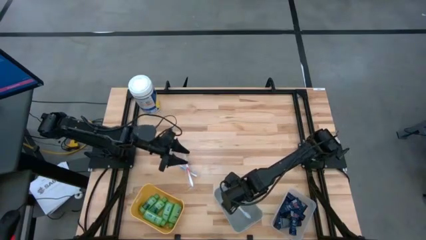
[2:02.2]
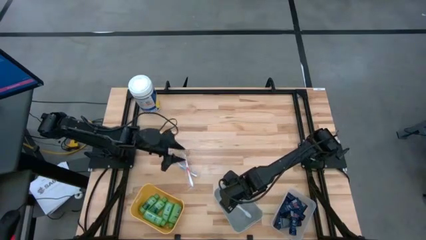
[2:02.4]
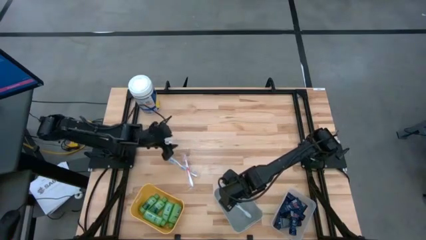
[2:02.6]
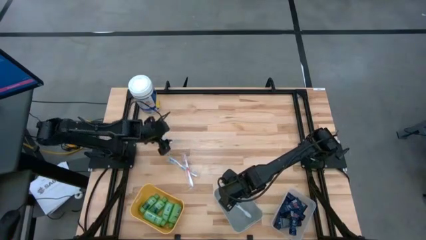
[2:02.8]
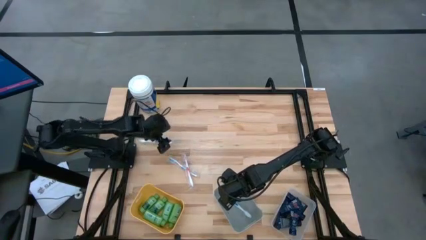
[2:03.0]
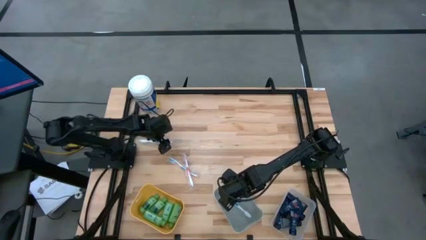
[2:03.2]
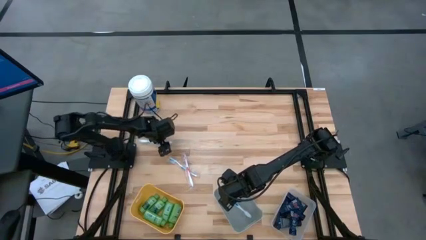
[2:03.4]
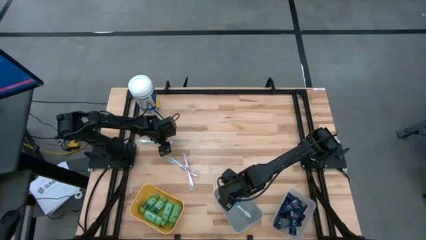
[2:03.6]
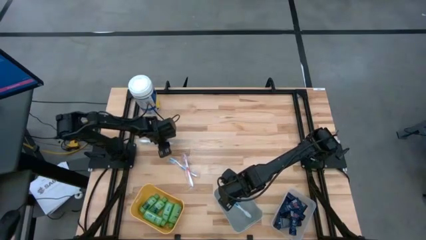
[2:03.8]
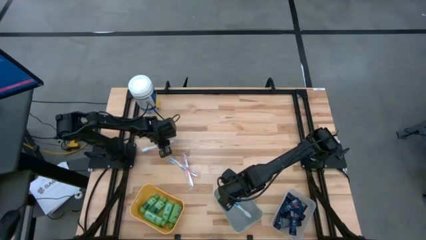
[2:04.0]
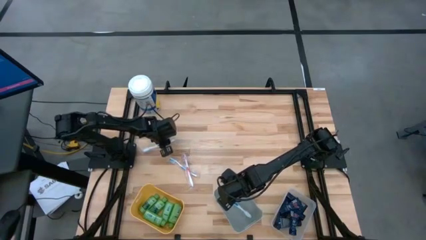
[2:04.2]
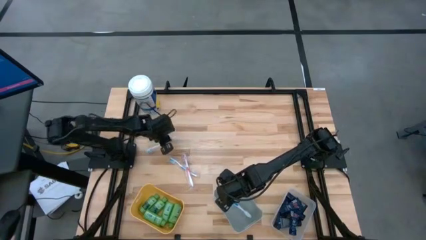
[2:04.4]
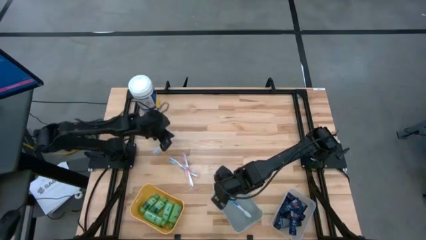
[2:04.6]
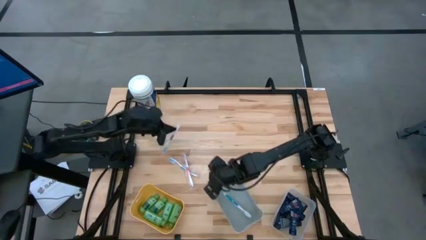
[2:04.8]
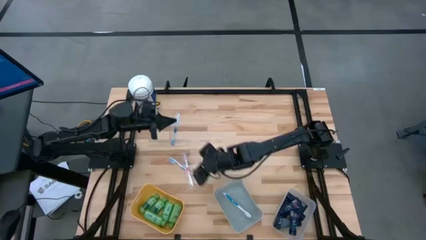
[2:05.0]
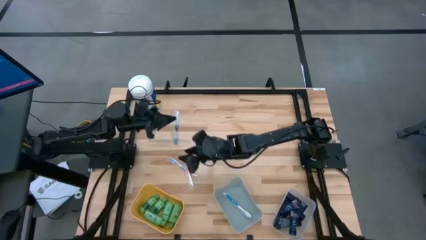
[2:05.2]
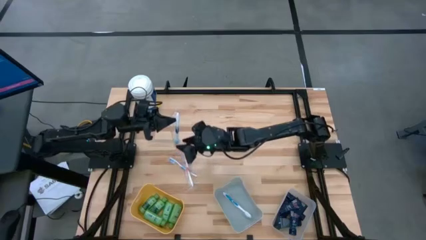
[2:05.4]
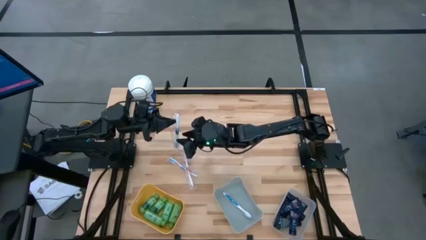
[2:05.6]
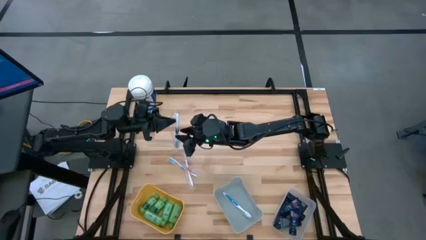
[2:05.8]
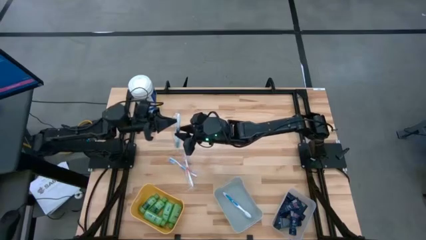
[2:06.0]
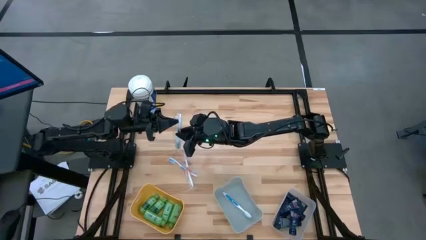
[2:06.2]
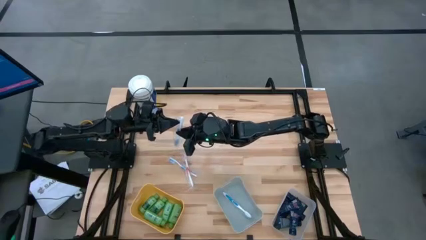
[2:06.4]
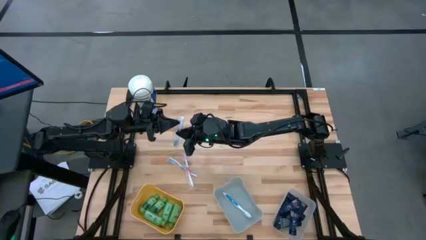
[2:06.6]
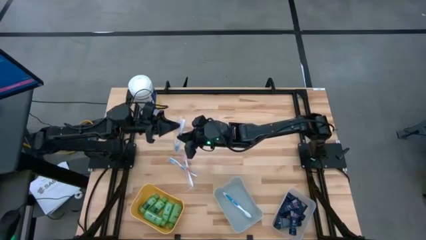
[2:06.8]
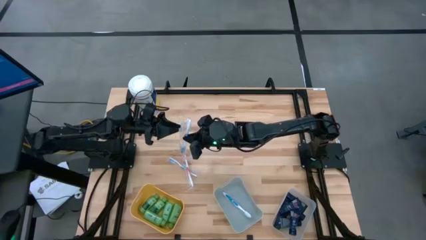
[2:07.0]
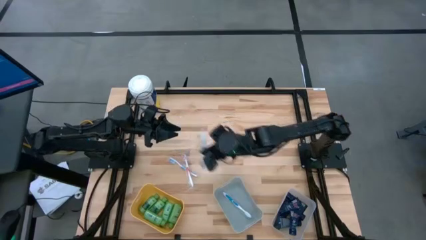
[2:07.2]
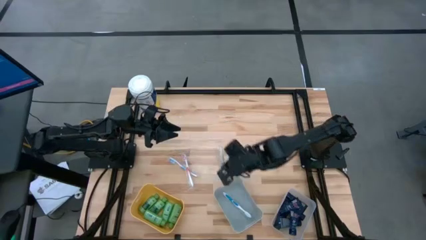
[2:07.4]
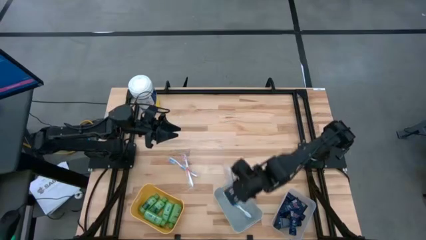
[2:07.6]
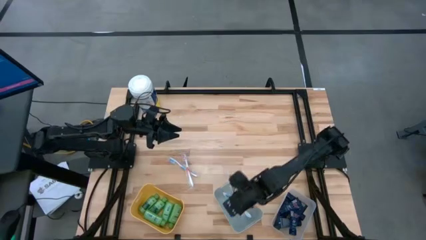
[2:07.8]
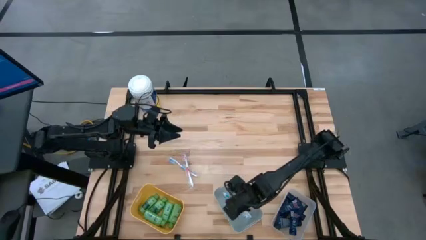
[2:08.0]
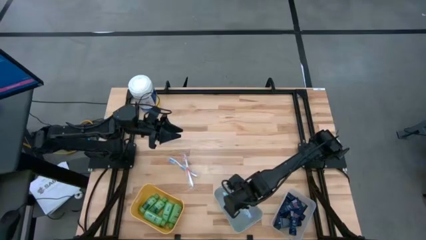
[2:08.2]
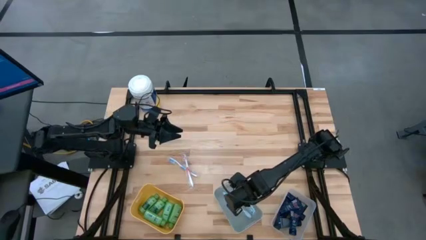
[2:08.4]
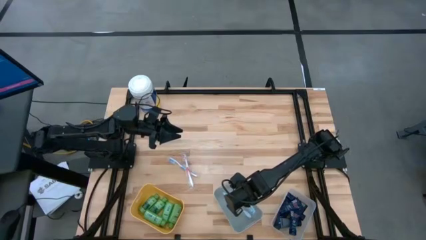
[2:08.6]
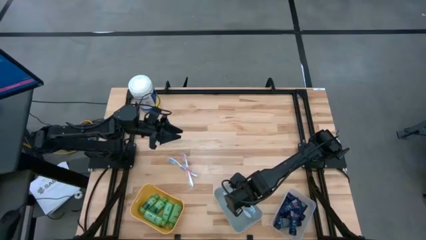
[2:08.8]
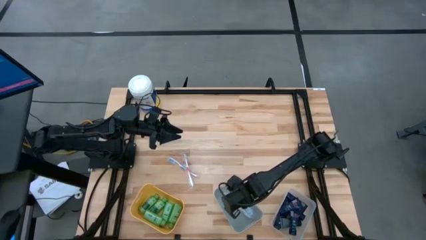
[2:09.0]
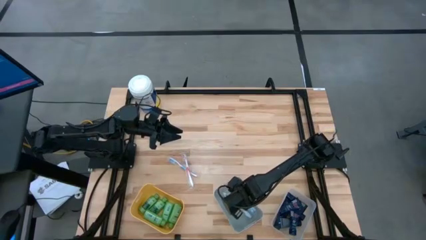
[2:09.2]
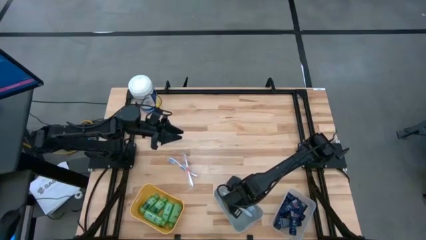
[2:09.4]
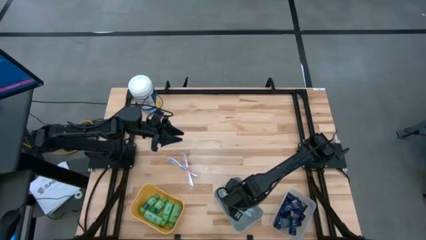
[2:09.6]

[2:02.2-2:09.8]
Task: Pick & Place Travel size toiletries
Put the blue toothbrush into the gray bin

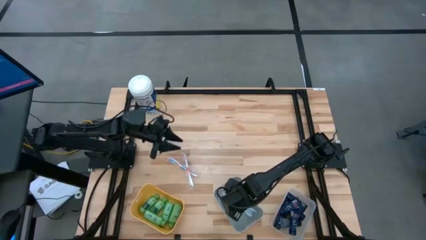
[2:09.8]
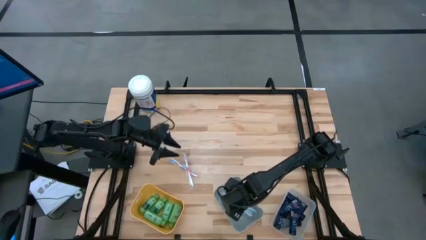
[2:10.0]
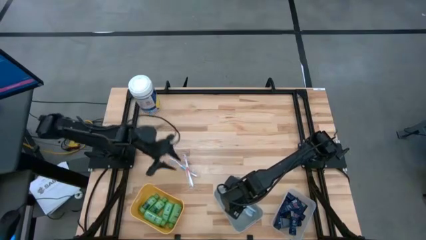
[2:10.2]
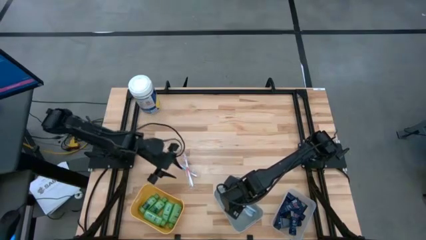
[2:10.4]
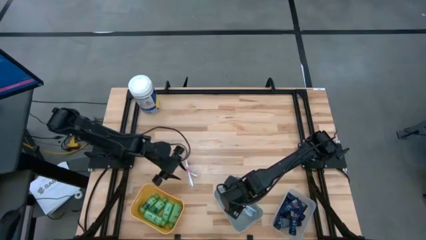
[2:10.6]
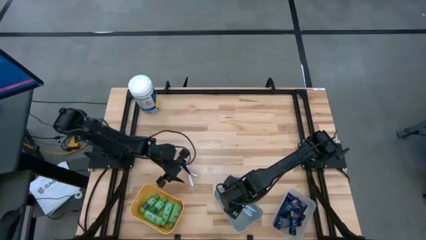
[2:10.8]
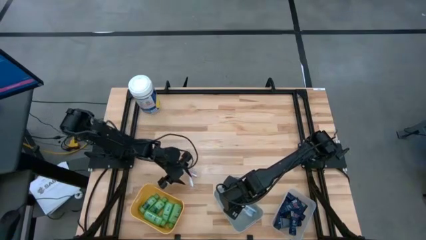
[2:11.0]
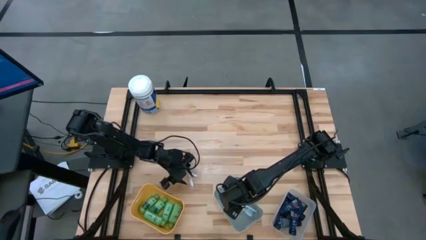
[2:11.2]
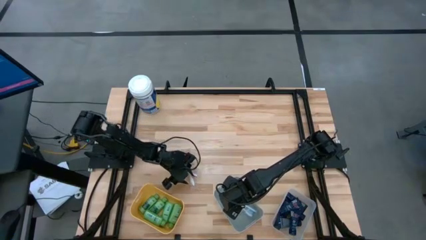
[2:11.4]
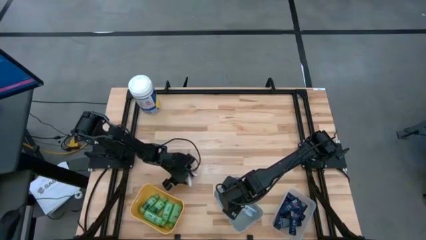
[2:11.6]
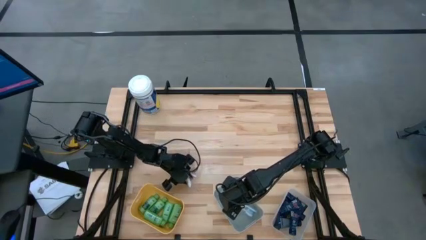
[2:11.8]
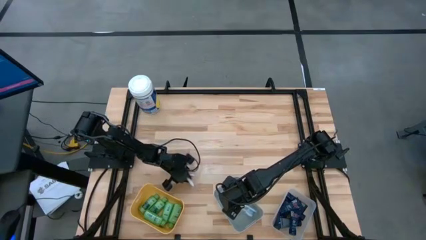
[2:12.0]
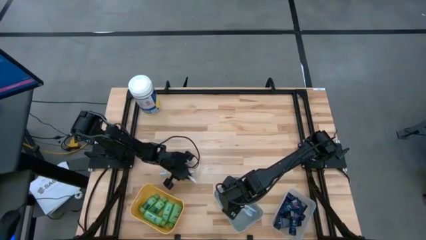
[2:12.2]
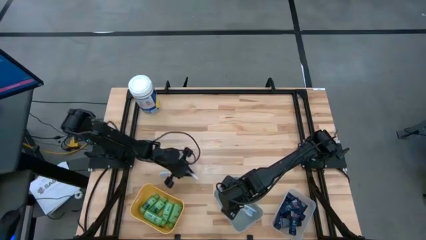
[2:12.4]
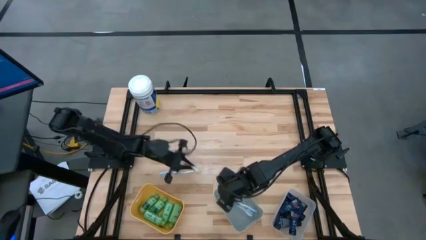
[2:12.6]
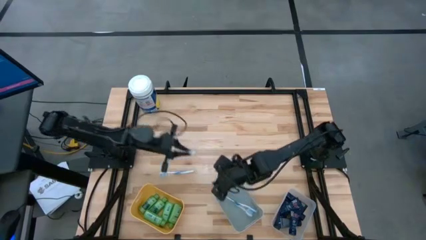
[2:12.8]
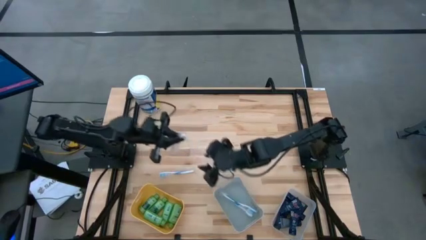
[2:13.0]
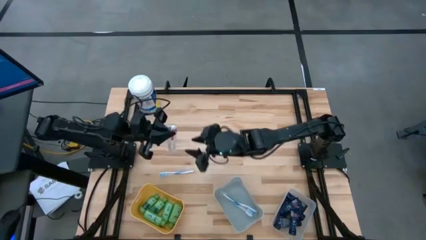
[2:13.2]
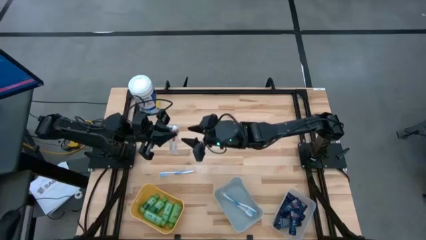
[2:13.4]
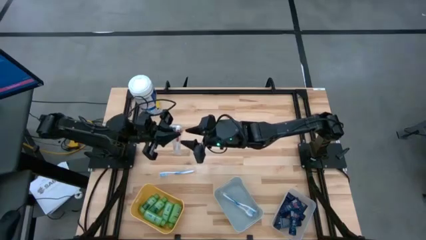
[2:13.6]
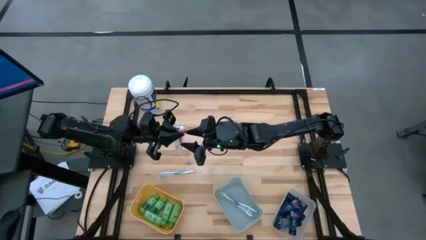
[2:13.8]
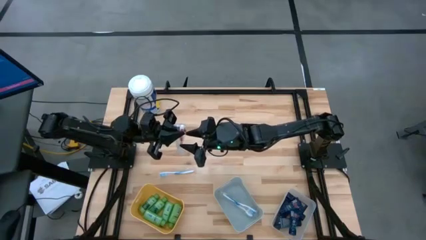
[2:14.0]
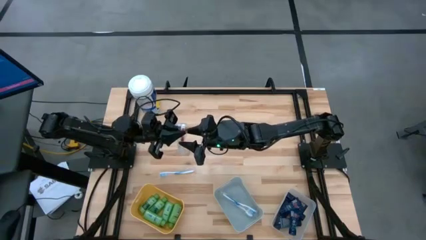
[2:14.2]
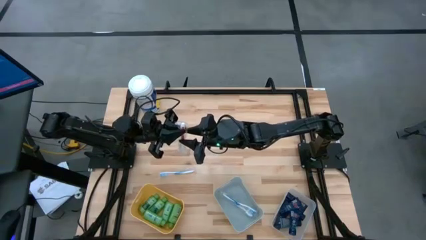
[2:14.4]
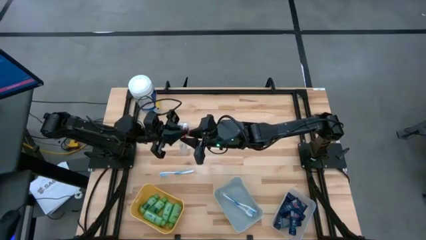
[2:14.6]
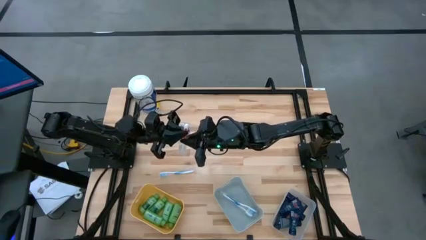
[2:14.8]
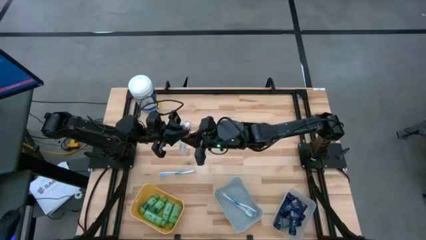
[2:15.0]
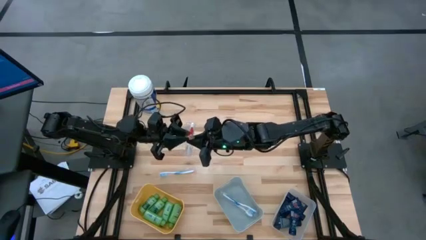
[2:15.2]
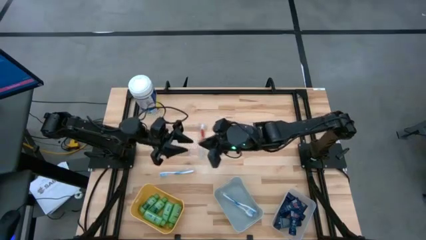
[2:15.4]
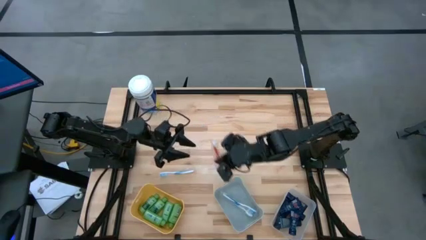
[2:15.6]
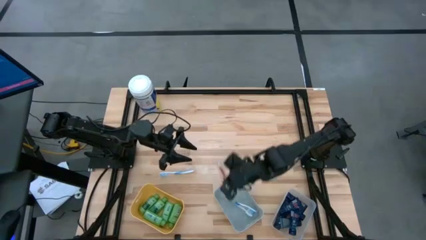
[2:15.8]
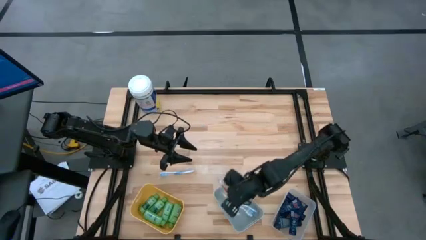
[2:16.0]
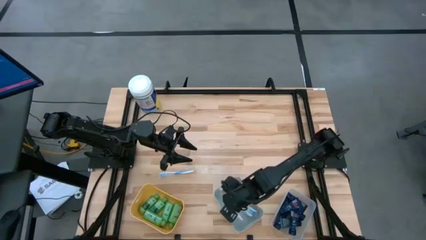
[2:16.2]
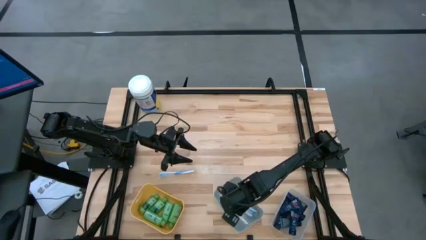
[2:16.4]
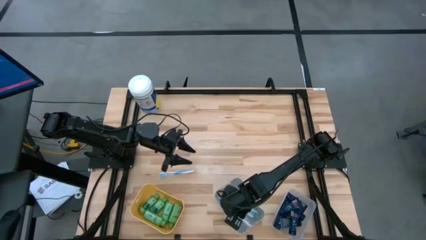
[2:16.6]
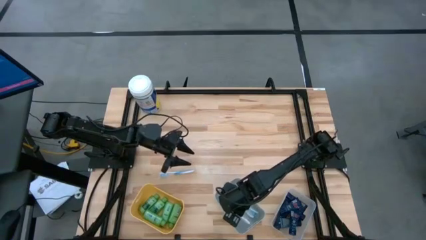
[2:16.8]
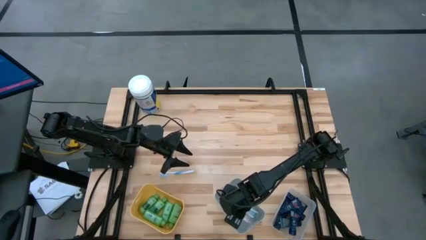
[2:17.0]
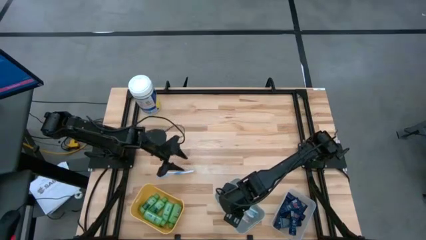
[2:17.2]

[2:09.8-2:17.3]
Put the red toothbrush into the gray bin

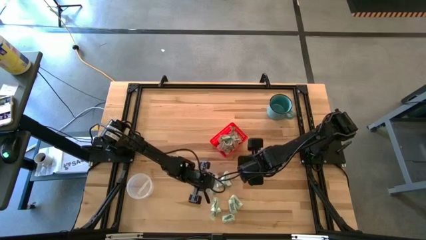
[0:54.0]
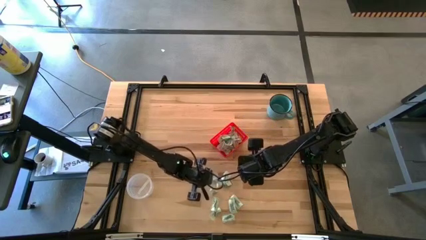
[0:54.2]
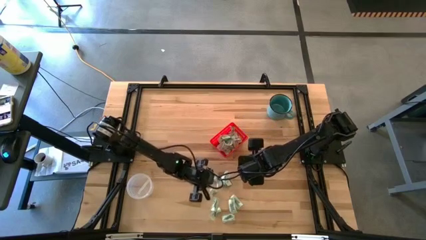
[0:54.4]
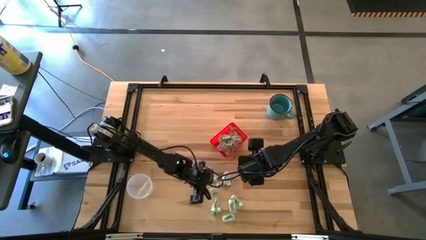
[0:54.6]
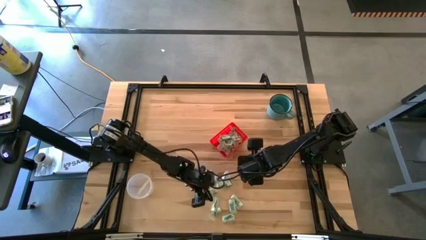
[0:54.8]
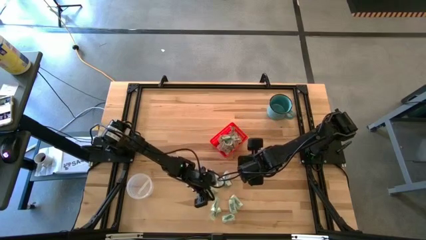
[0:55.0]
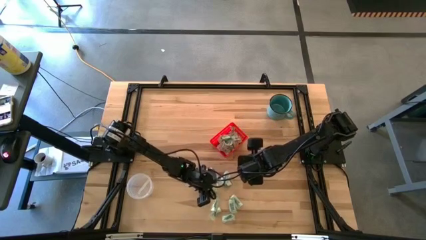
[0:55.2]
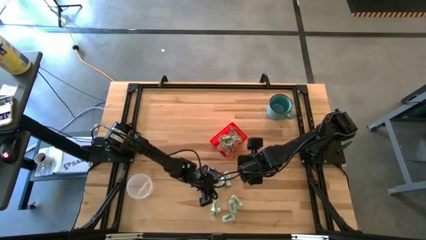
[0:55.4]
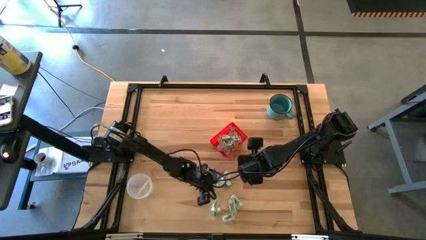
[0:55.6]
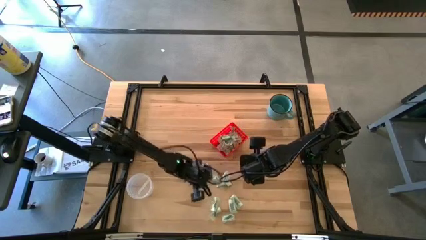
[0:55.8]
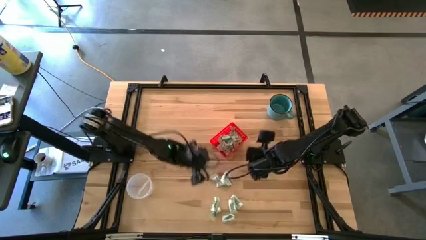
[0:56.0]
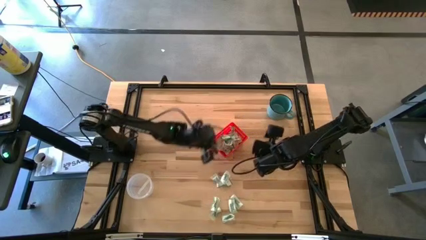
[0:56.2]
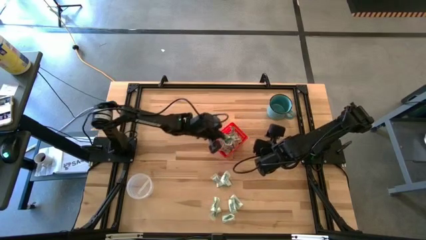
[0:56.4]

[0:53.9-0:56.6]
Task: Pick and place items into bin
Put the stevia packet into the red bin
